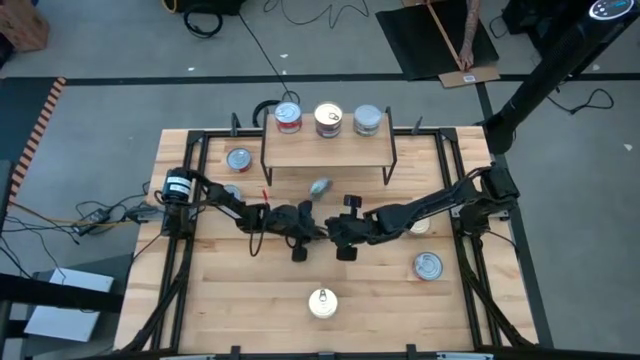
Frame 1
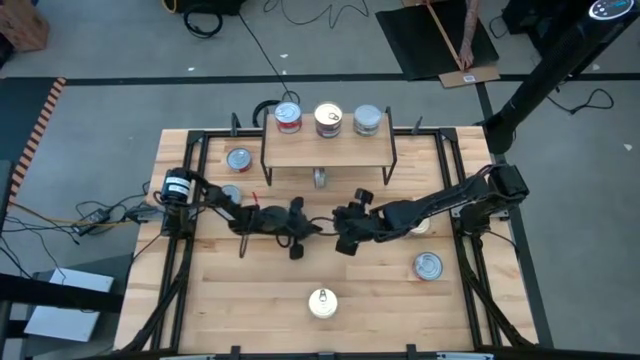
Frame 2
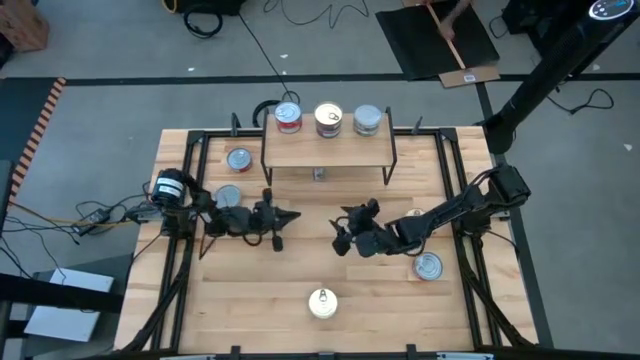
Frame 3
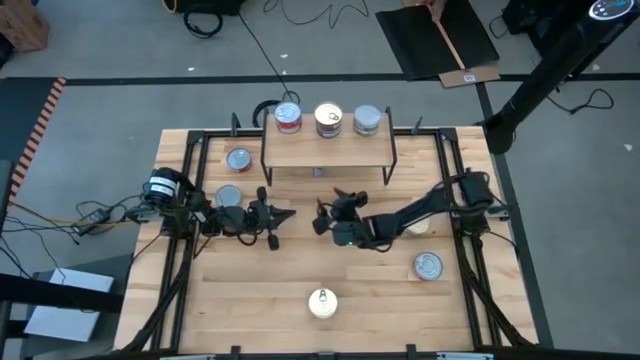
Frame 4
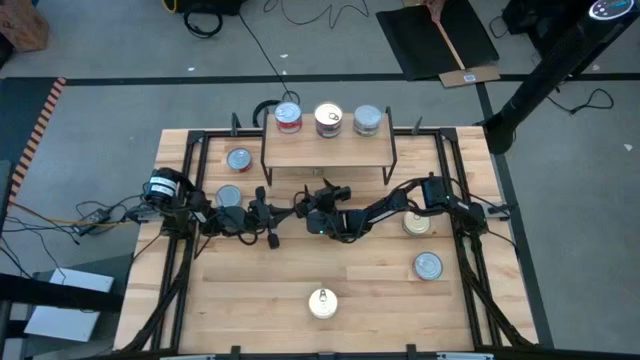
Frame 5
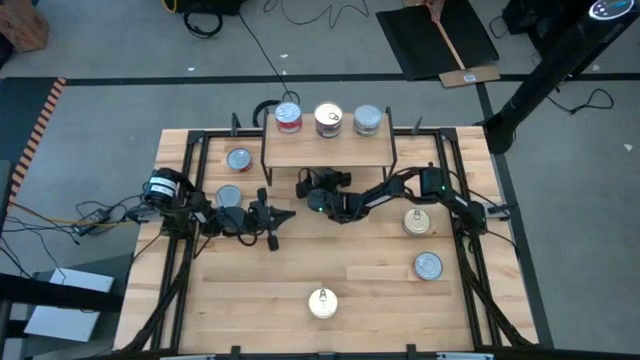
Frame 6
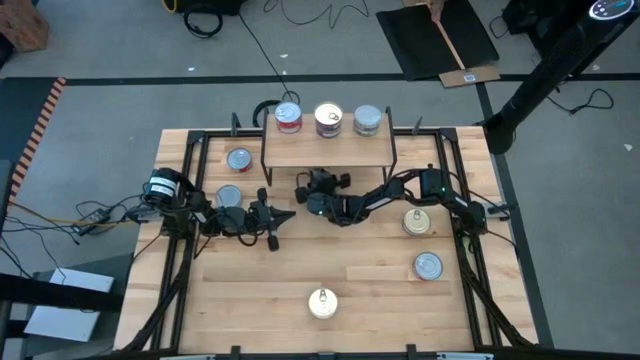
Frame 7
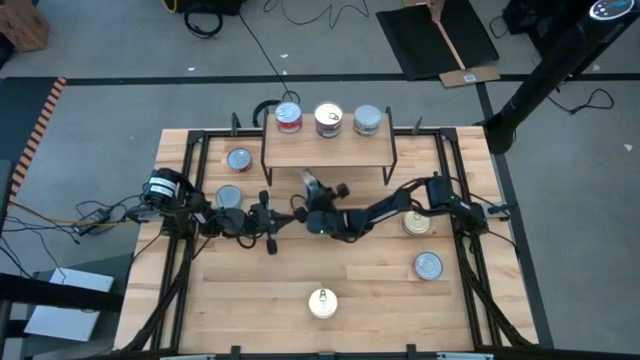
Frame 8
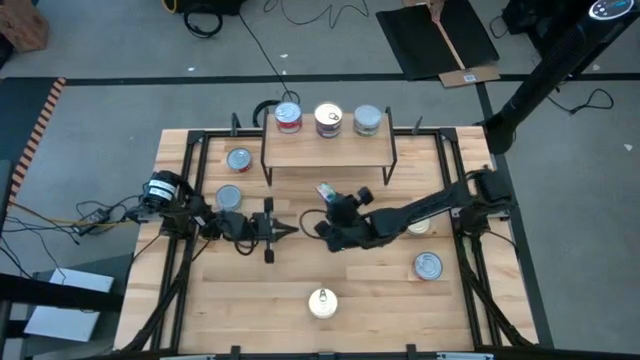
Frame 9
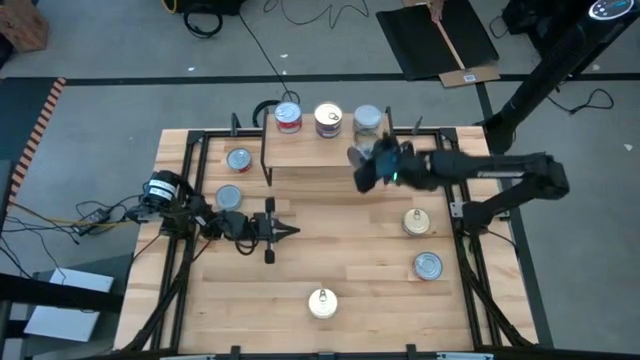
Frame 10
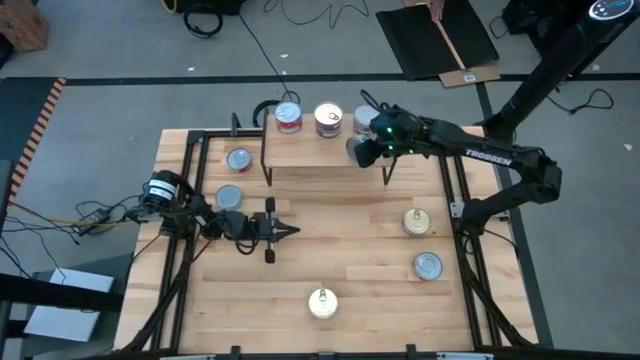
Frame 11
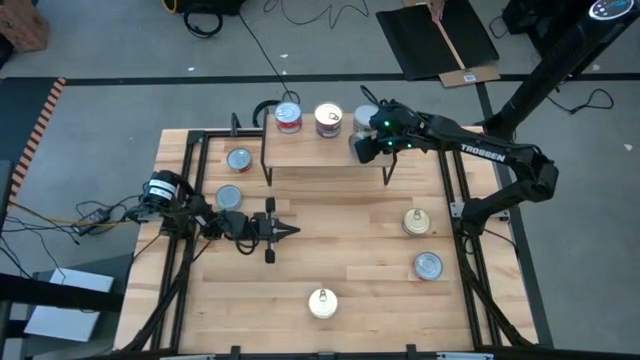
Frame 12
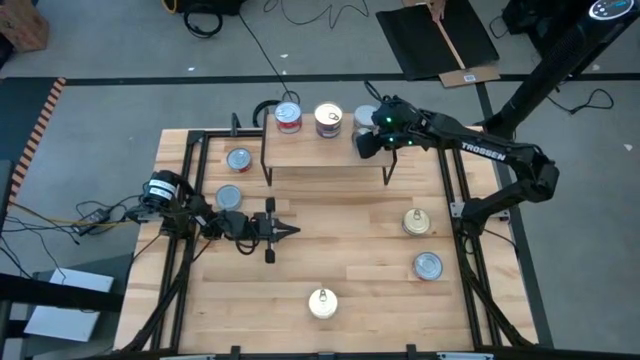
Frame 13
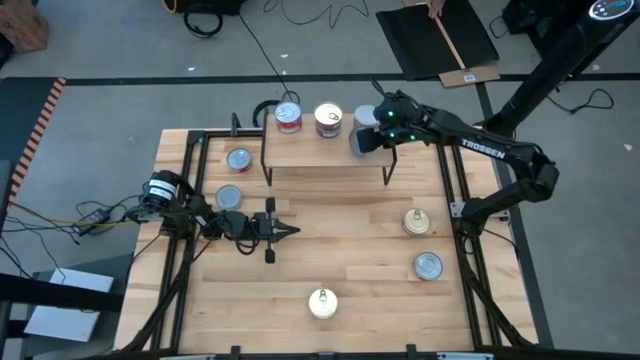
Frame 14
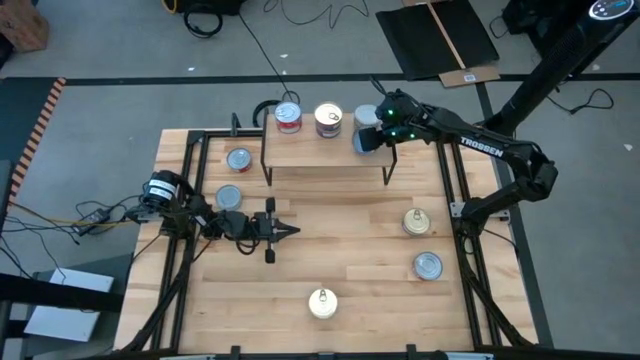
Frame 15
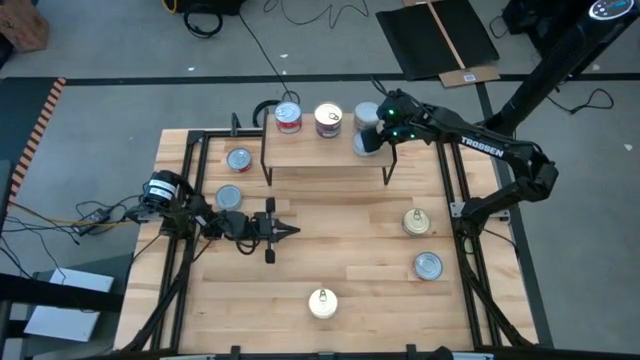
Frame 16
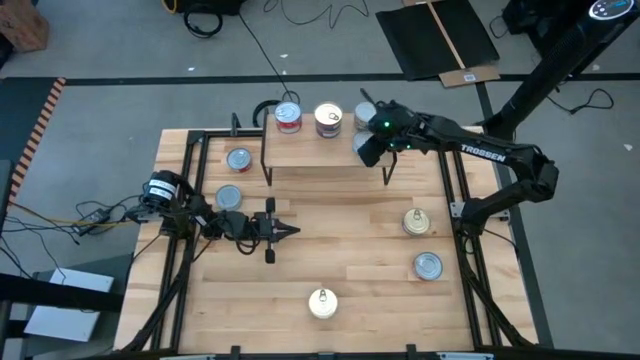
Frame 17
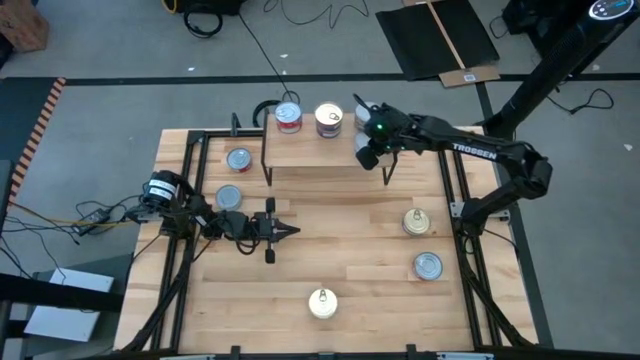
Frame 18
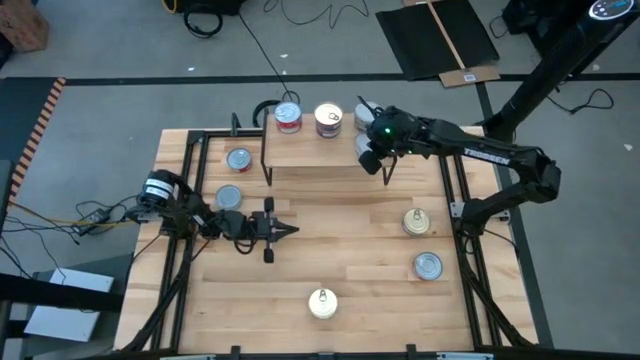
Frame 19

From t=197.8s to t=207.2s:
Task: Stack canned seafood by type on shelf
Put the green tuna can on the shelf aligned with the other green tuna can

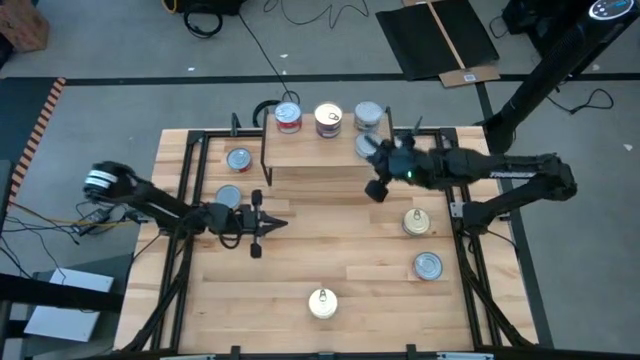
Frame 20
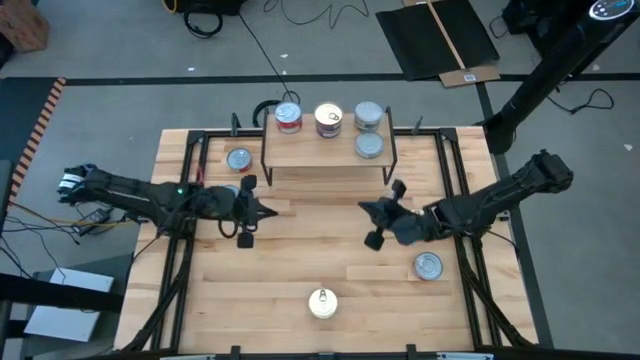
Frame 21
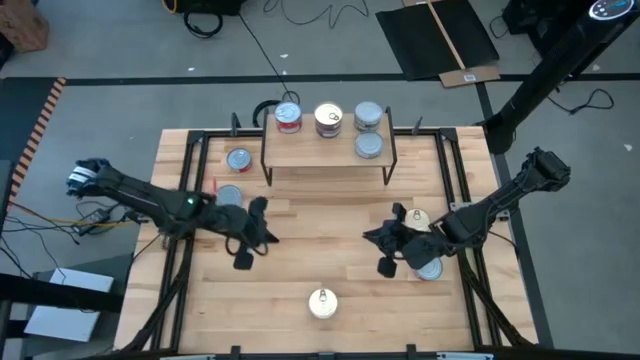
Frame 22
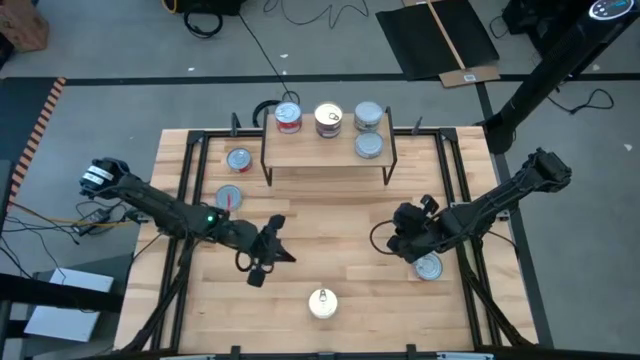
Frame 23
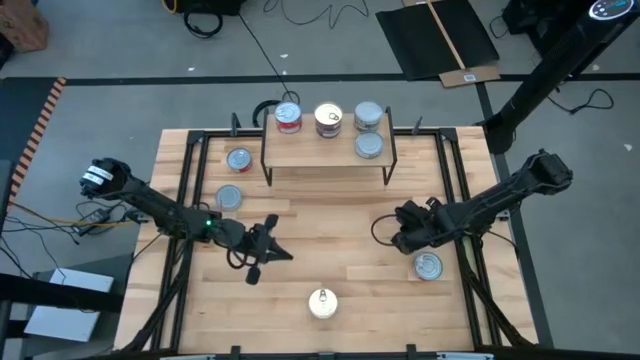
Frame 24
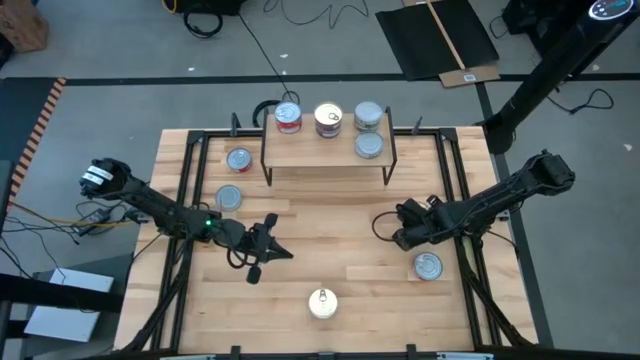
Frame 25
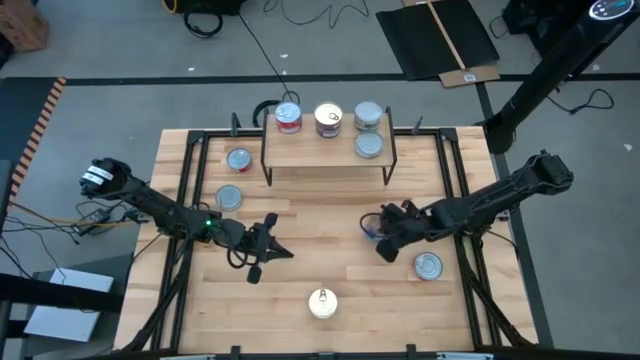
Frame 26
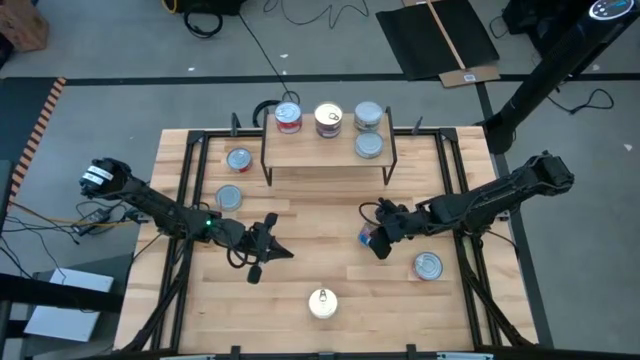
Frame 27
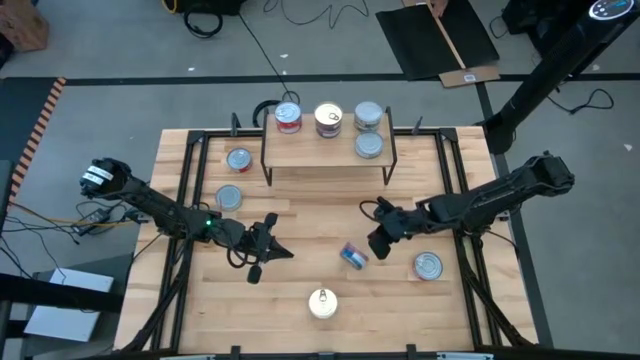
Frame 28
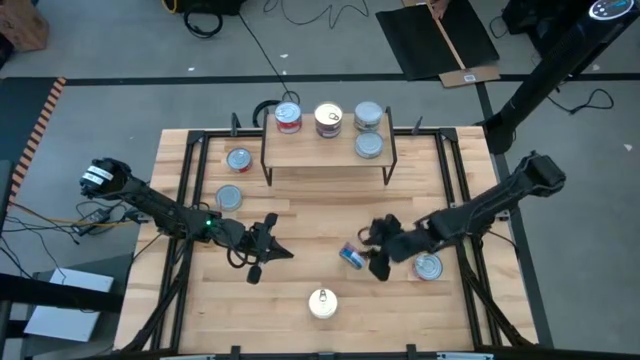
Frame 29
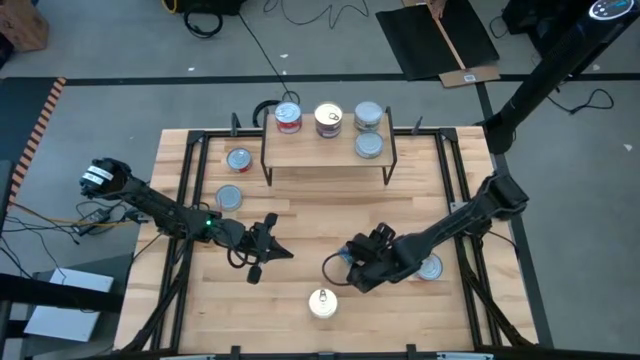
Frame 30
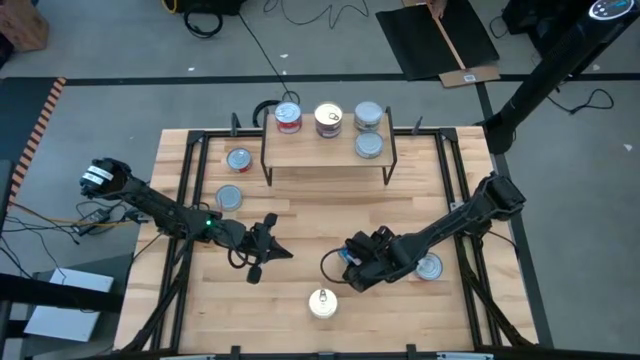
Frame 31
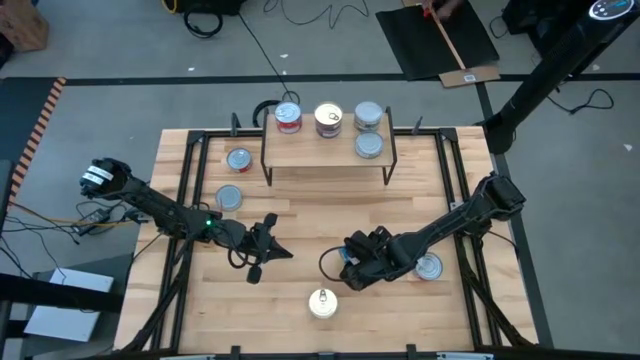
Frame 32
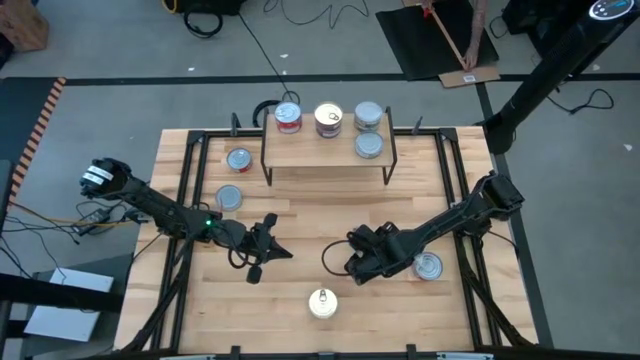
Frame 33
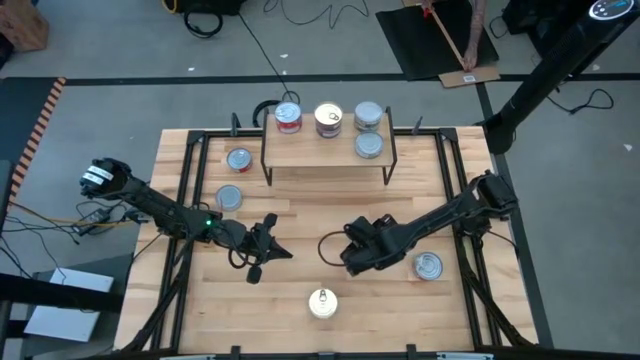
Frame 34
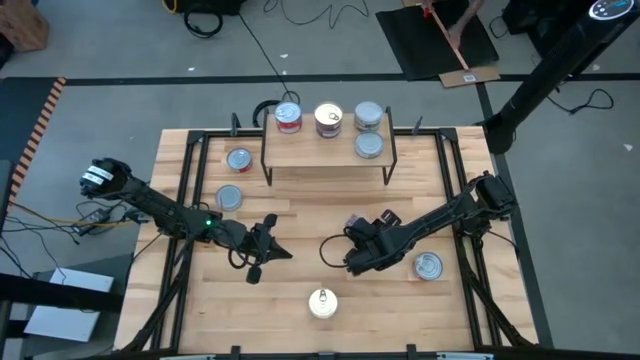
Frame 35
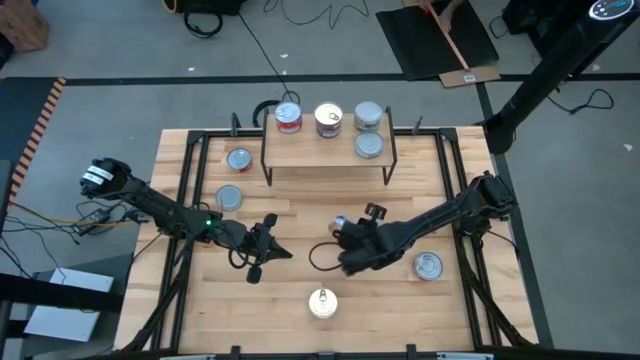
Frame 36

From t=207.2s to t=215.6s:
Put the blue pink tuna can on the shelf aligned with the other blue pink tuna can

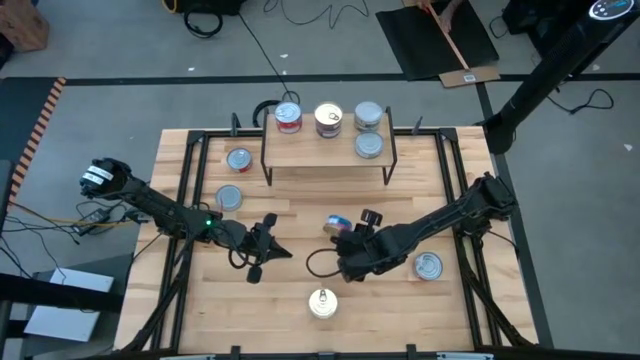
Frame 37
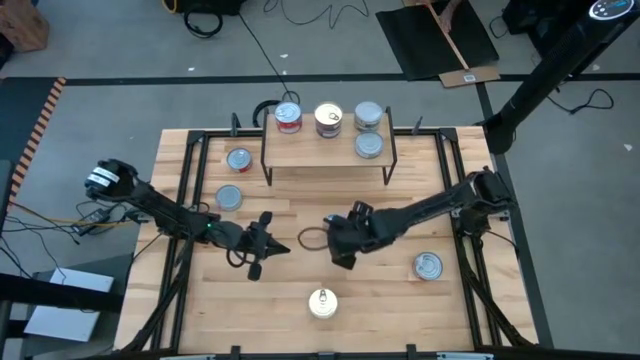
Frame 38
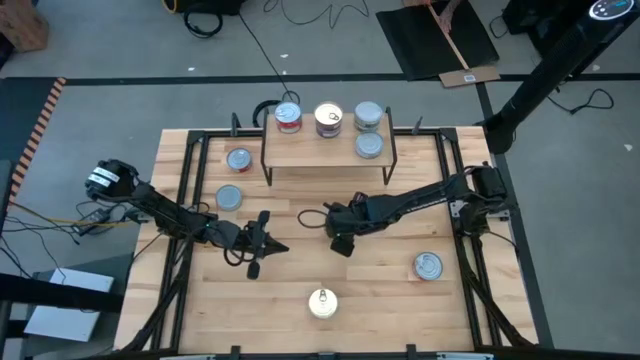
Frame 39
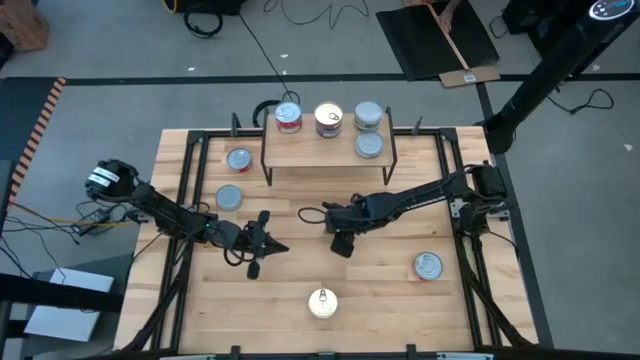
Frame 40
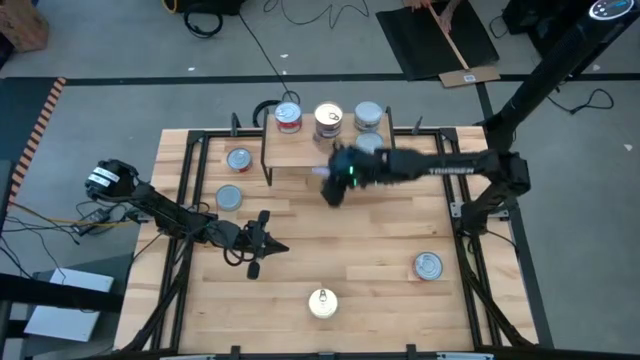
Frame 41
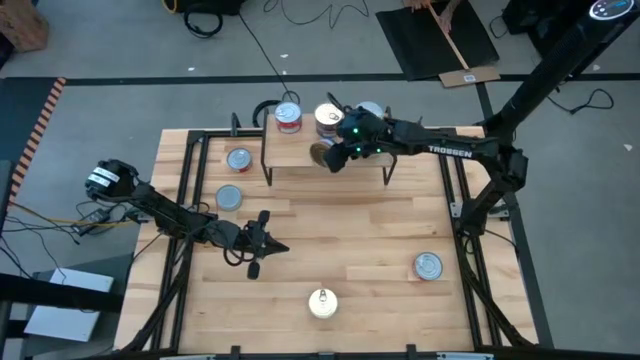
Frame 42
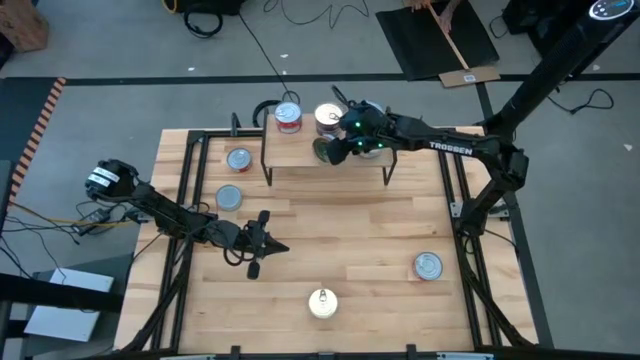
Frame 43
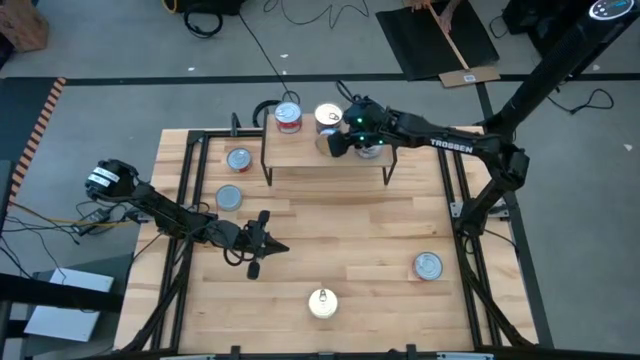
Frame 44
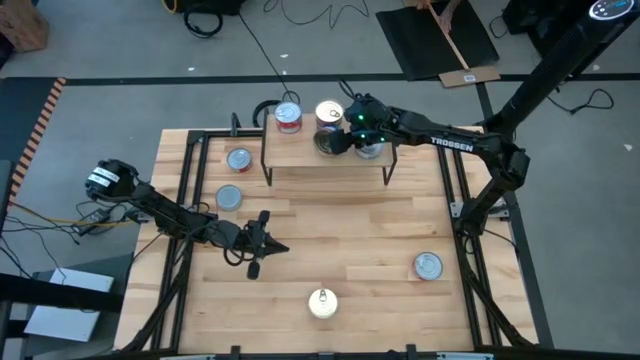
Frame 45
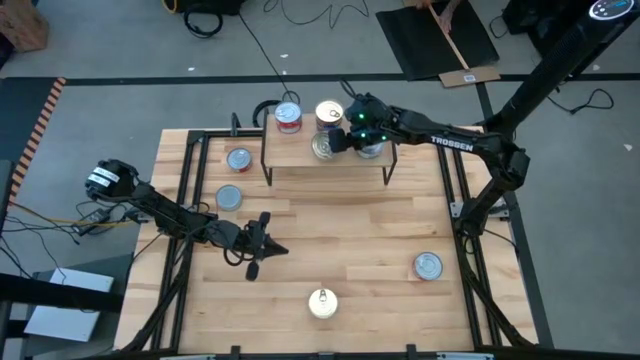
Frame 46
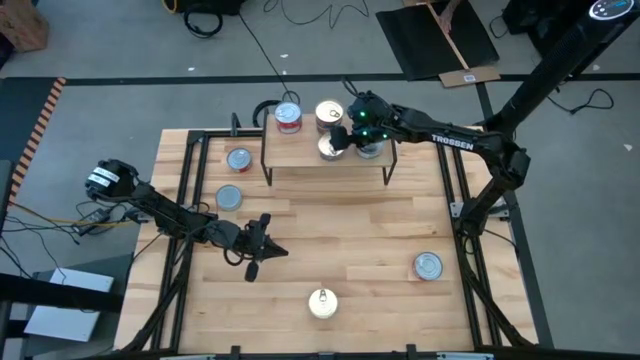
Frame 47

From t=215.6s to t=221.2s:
Put the blue pink tuna can on the shelf aligned with the other blue pink tuna can
